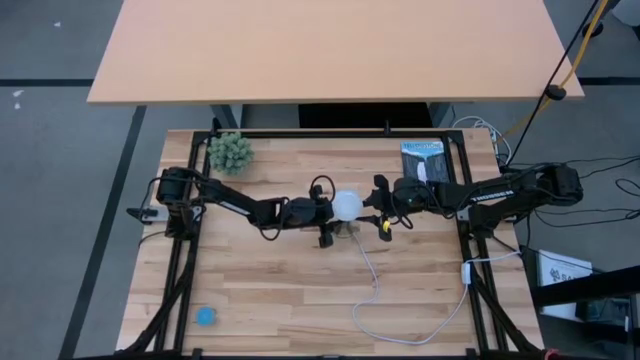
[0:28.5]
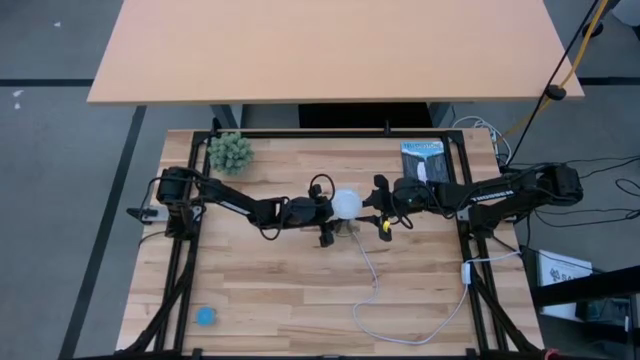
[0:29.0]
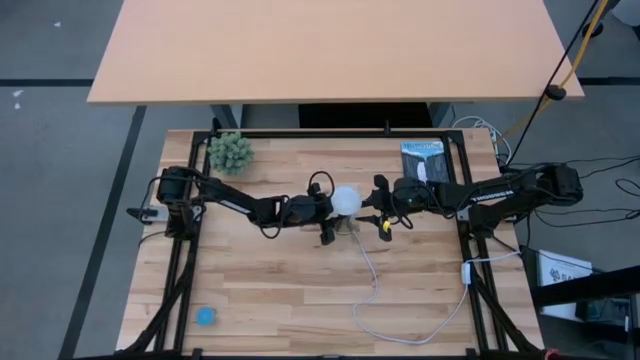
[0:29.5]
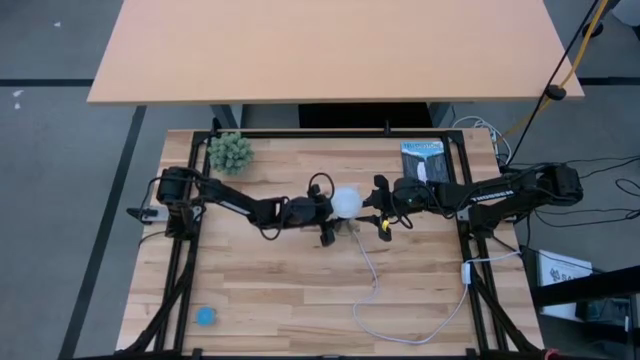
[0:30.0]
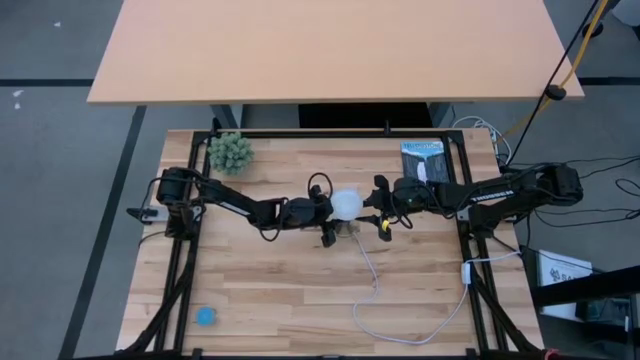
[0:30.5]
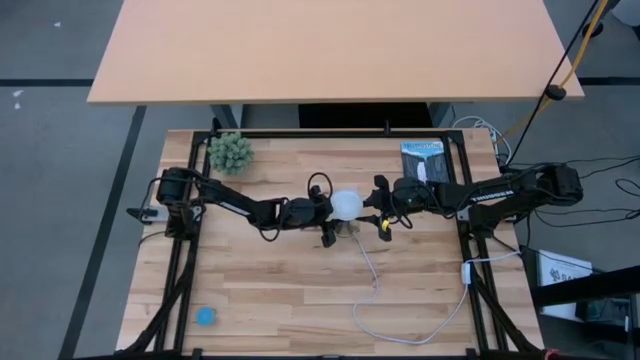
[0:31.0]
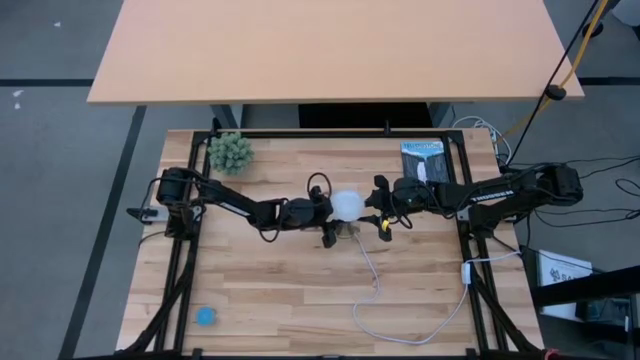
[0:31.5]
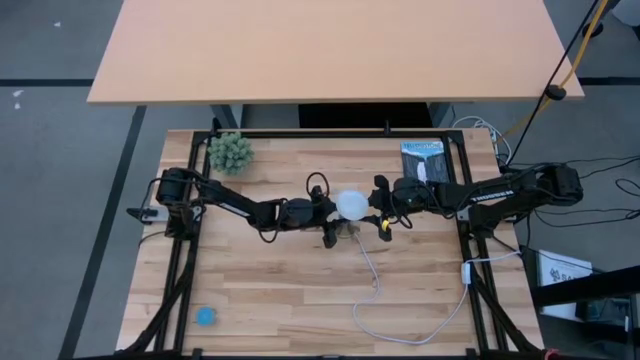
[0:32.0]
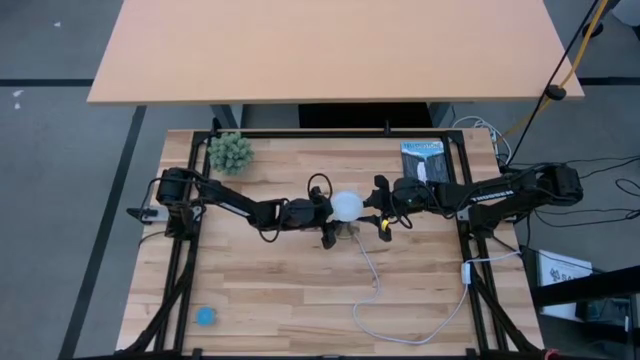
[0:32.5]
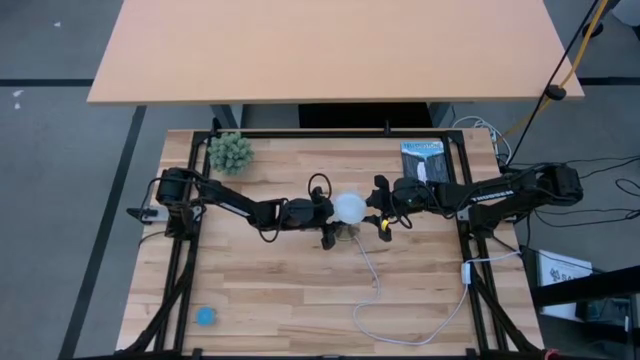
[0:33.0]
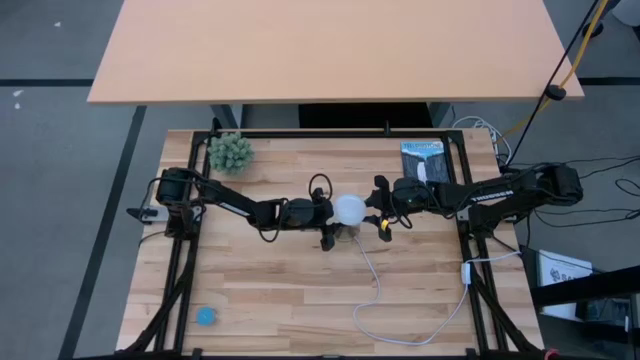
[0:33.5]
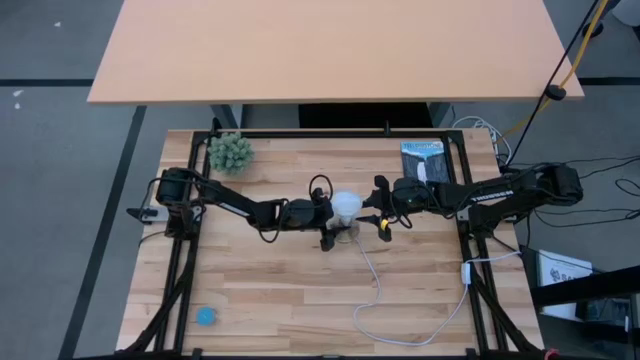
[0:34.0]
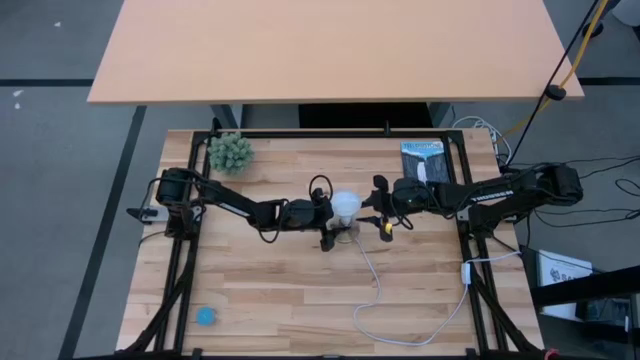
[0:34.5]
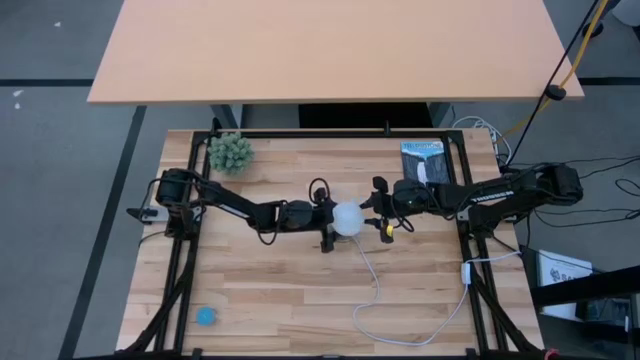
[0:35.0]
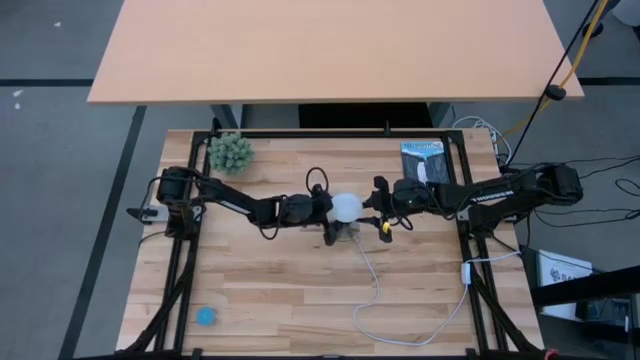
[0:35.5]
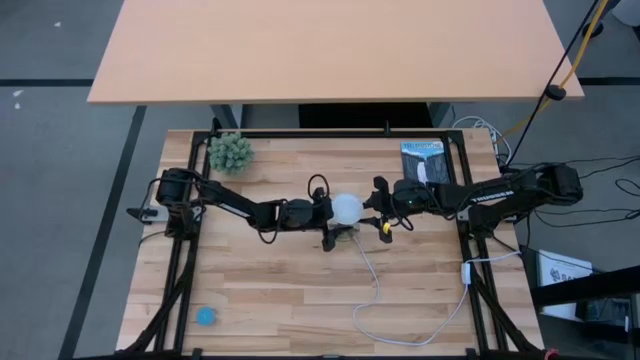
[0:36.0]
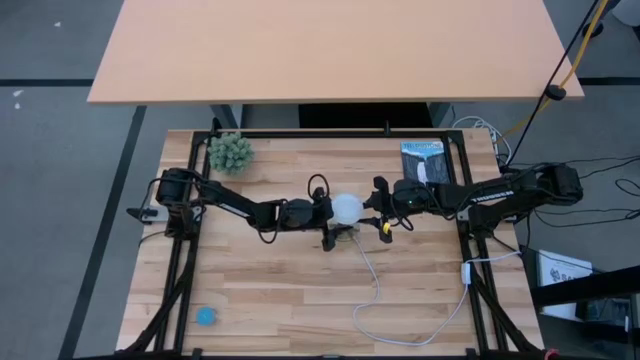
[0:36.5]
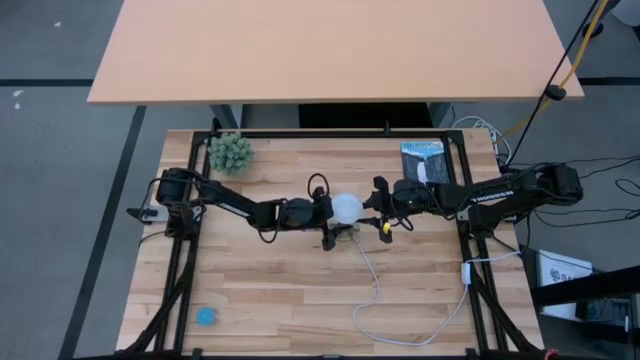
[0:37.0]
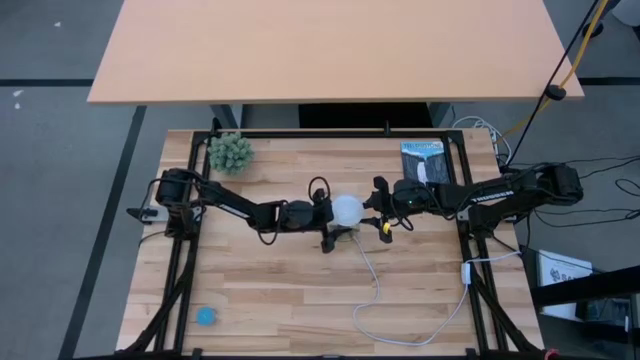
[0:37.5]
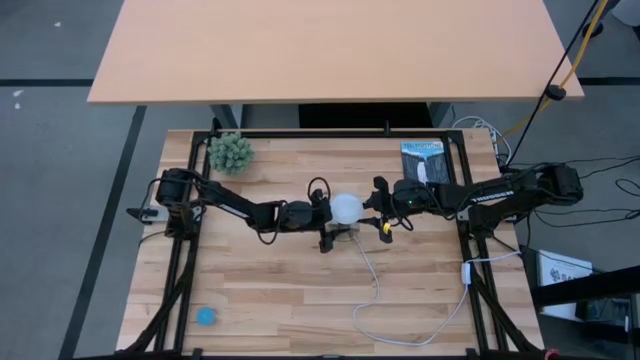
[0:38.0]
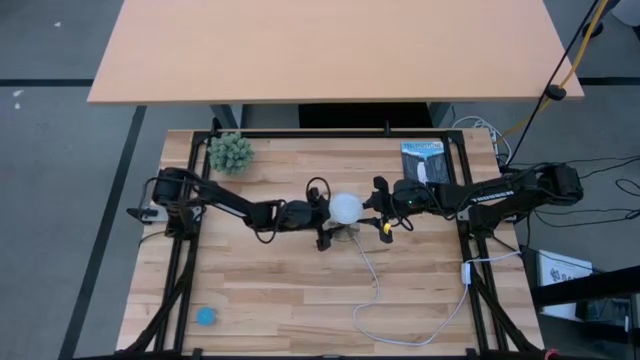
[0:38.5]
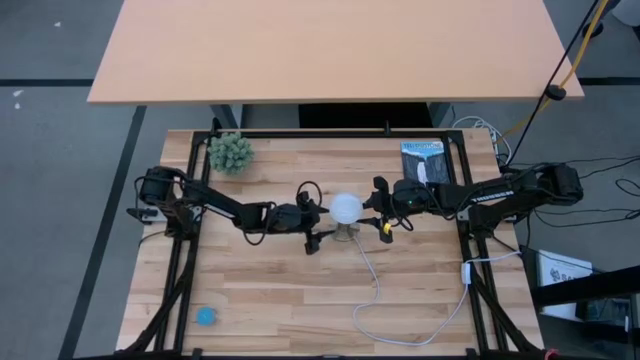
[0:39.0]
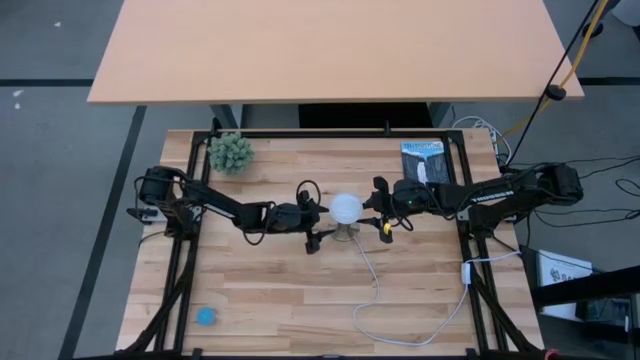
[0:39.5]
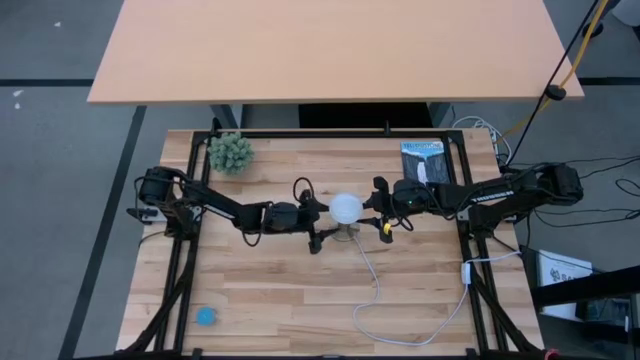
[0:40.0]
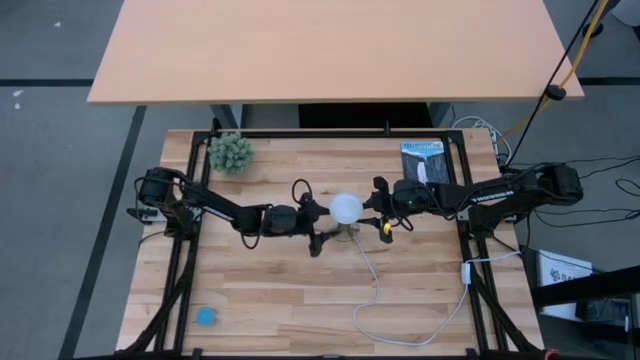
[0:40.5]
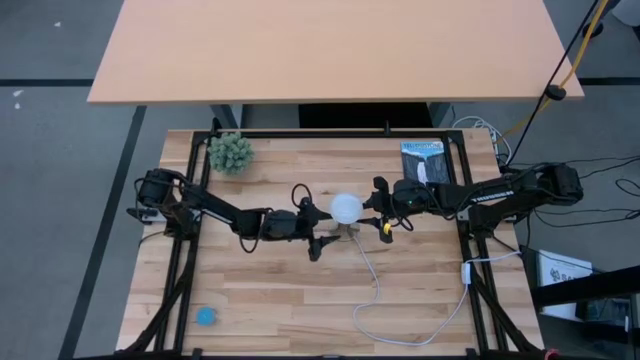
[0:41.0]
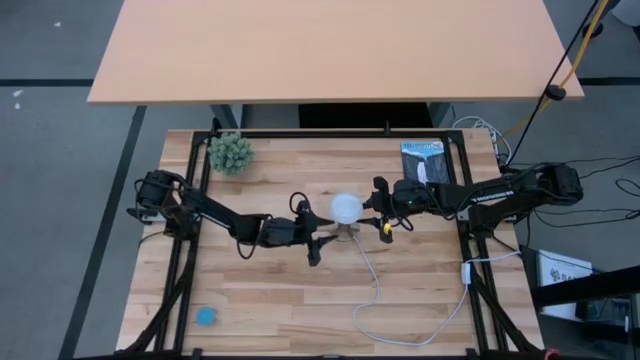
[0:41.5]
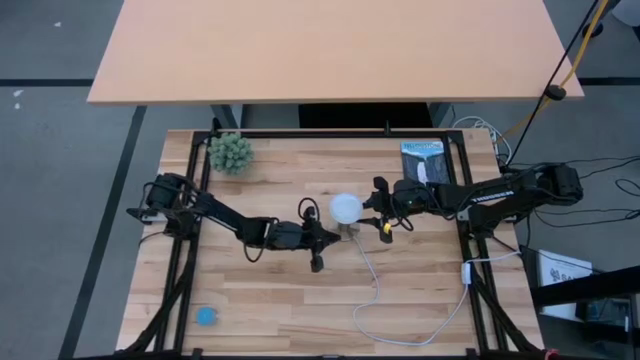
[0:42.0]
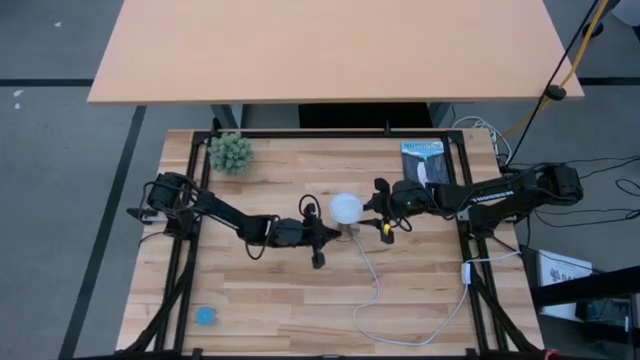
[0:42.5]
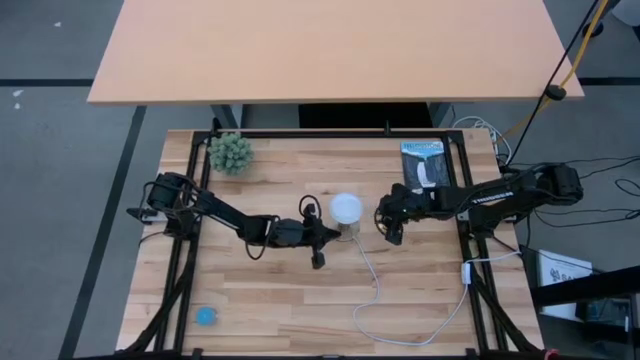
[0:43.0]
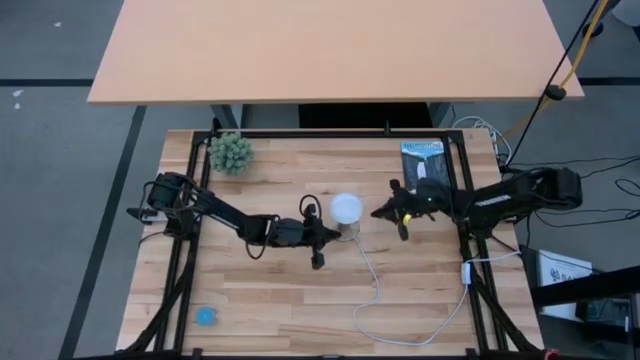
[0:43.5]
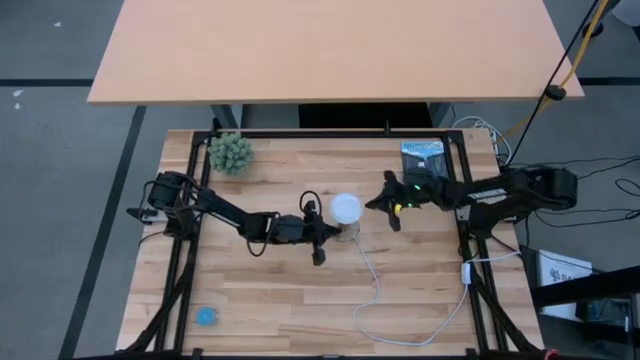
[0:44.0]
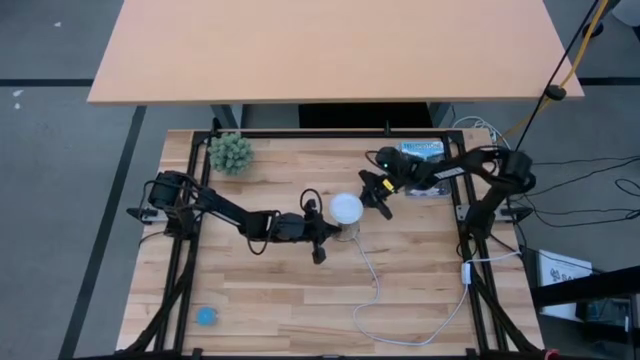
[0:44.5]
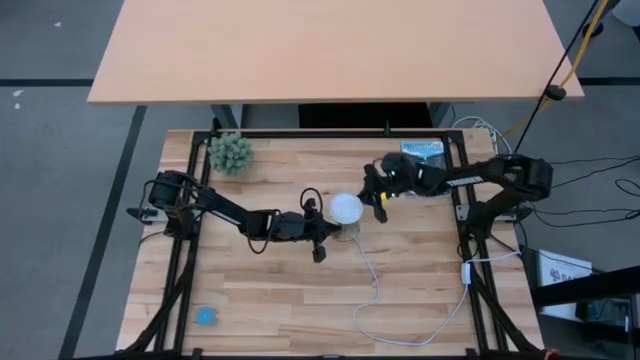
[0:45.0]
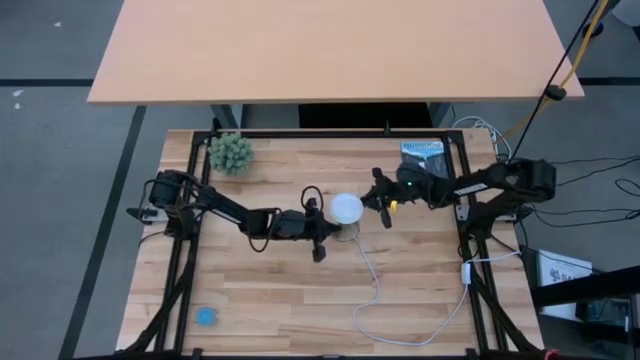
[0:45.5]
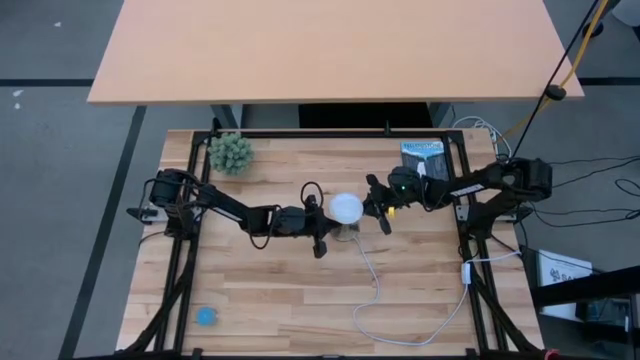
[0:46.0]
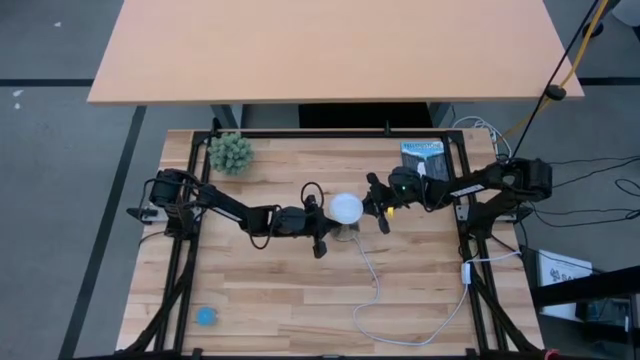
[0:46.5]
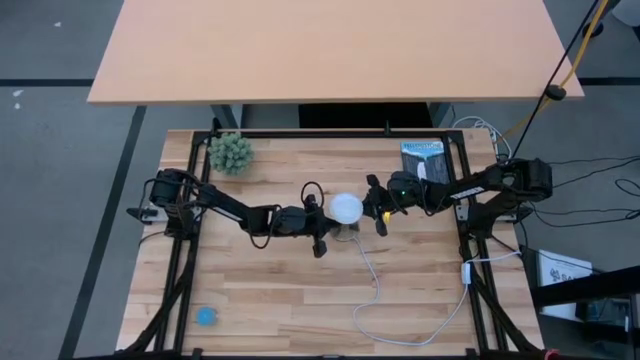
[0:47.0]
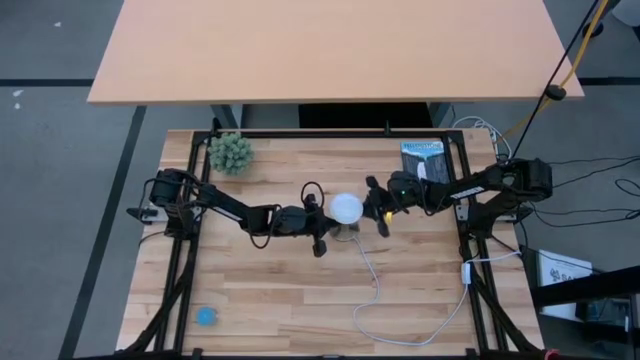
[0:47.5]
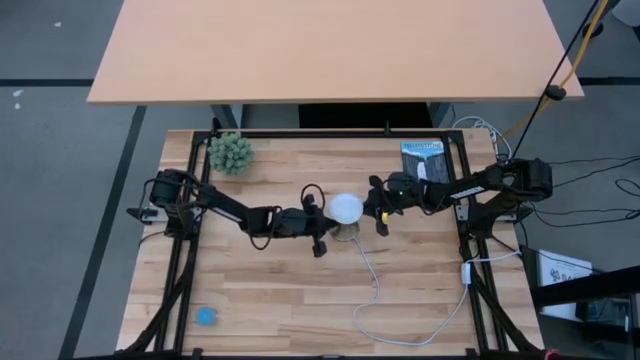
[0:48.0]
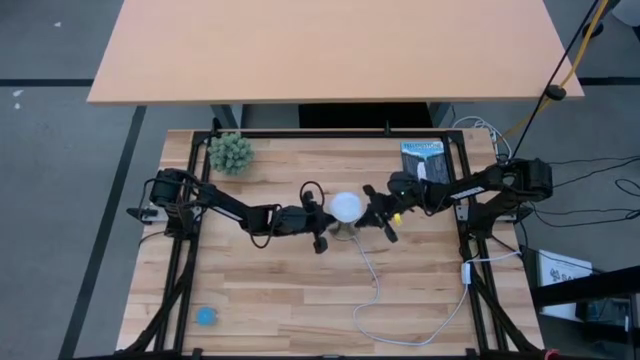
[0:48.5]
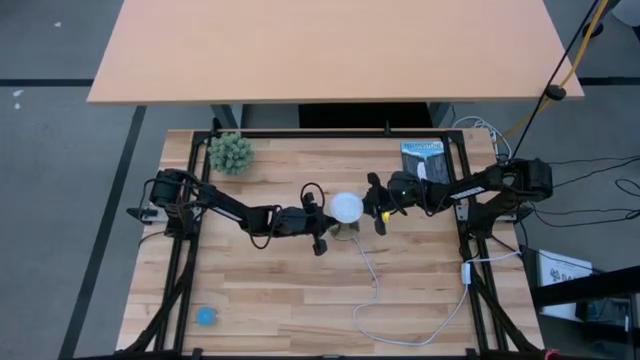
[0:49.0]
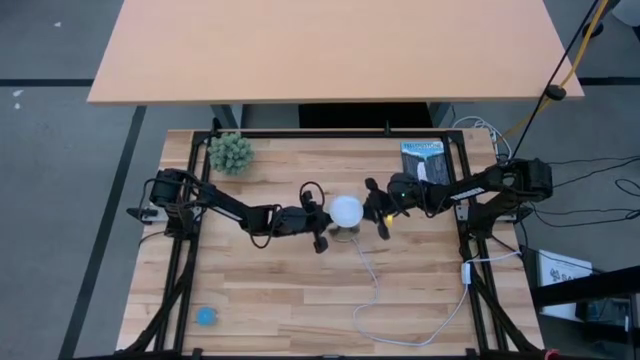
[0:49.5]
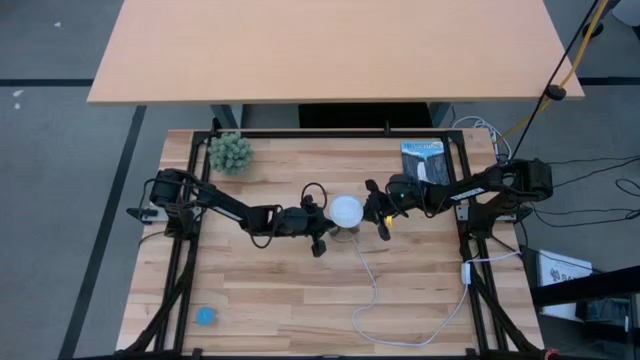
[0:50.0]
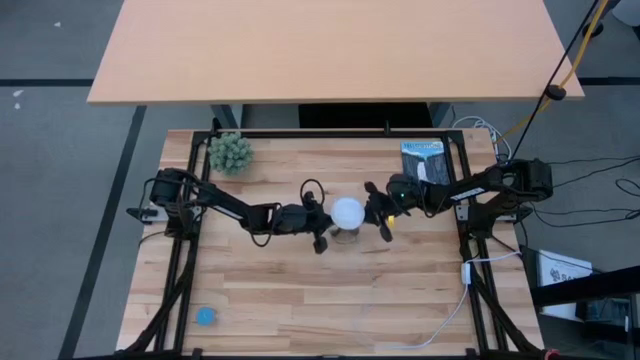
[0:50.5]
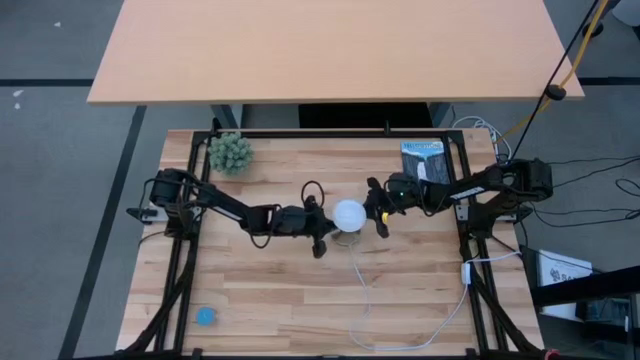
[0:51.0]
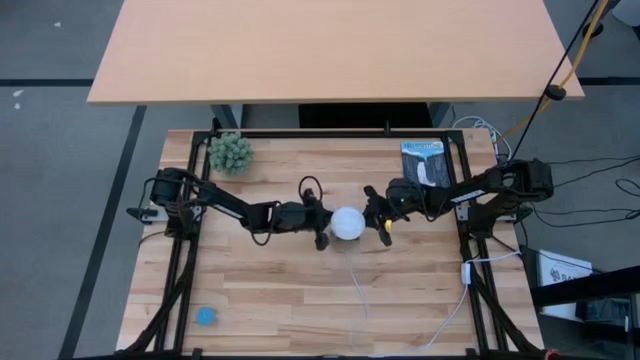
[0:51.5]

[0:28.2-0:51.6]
Task: Screw lightbulb
Insert the lightbulb into the lamp
